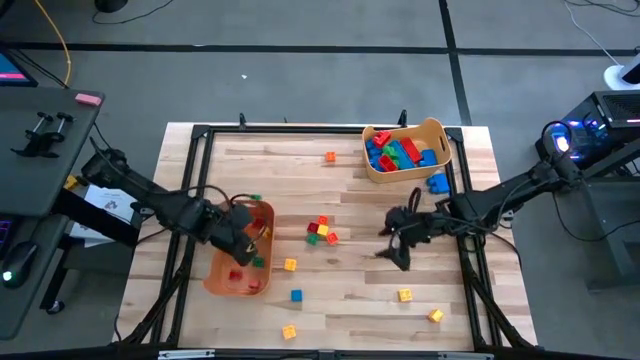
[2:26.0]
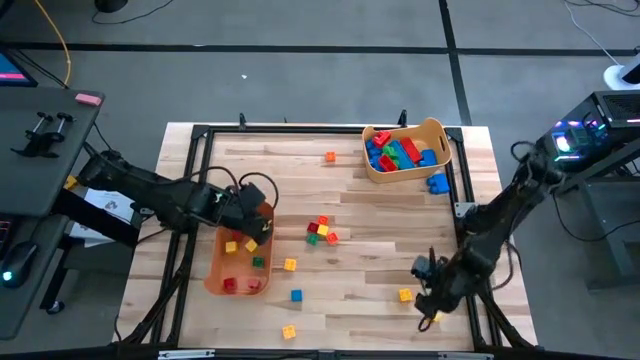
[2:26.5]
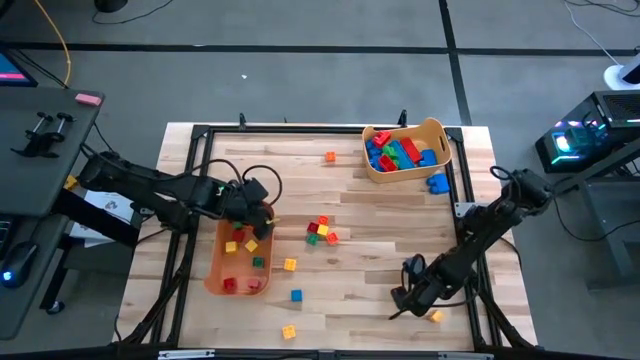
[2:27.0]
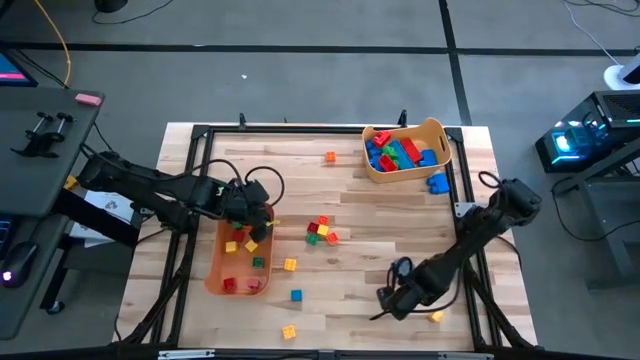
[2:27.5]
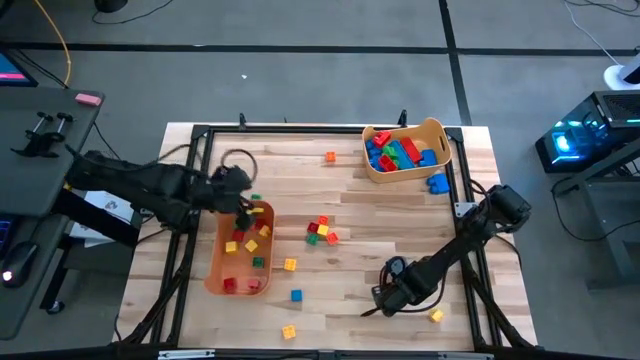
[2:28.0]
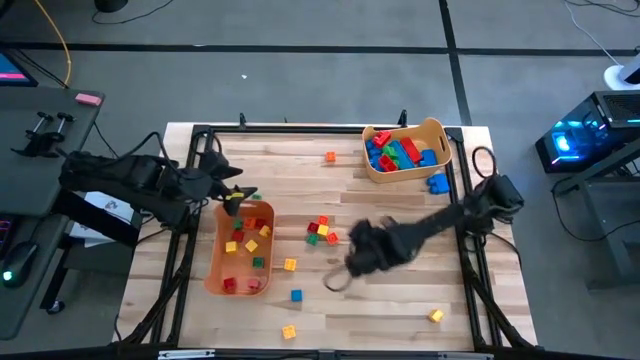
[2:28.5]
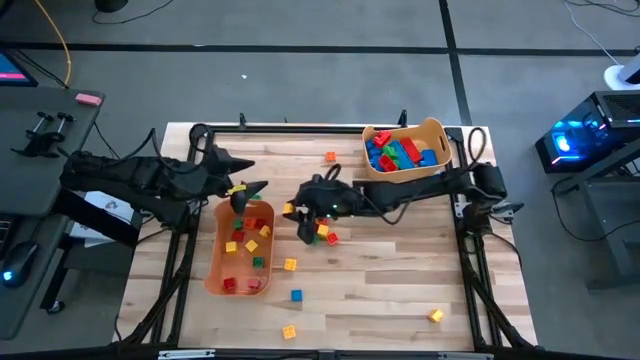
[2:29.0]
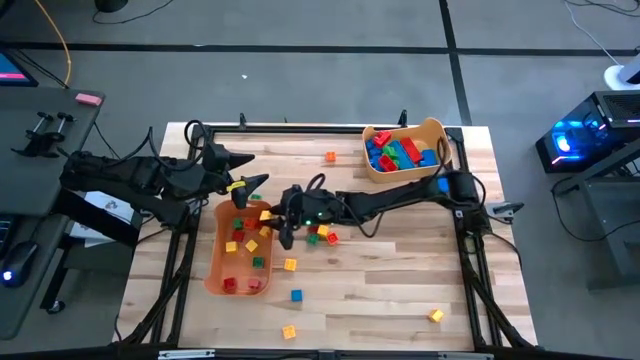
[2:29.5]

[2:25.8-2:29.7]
Task: Sort blocks by size
Put the yellow game piece into the orange bin

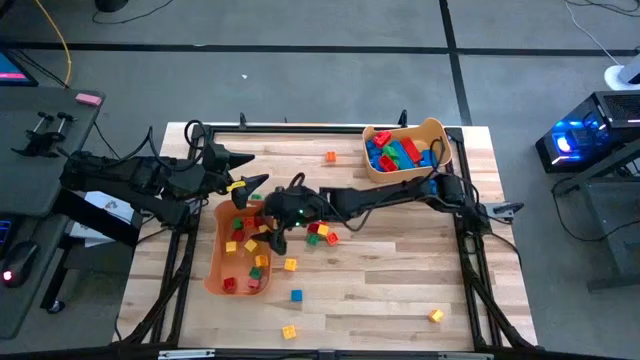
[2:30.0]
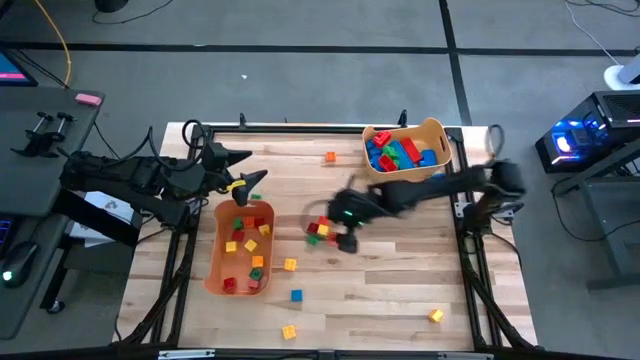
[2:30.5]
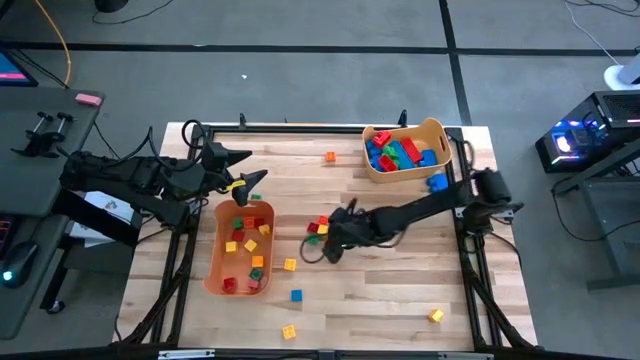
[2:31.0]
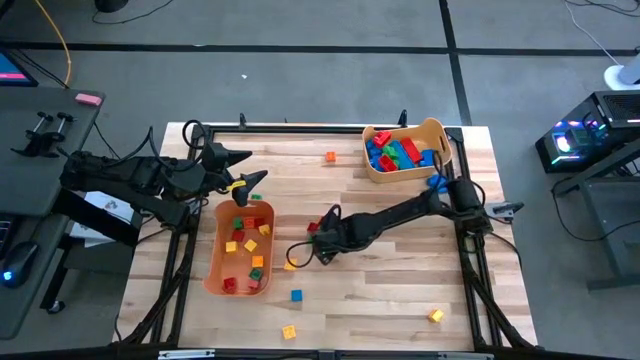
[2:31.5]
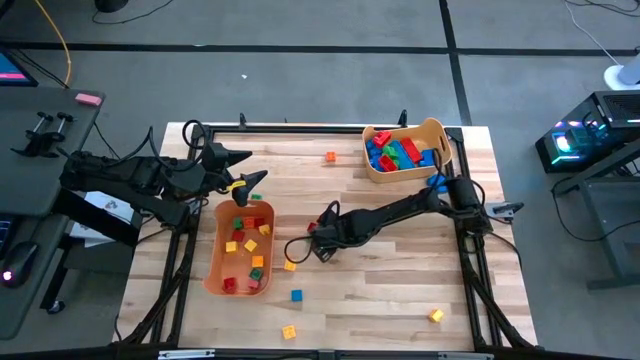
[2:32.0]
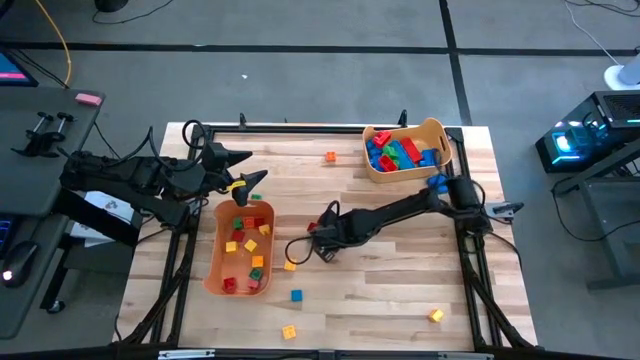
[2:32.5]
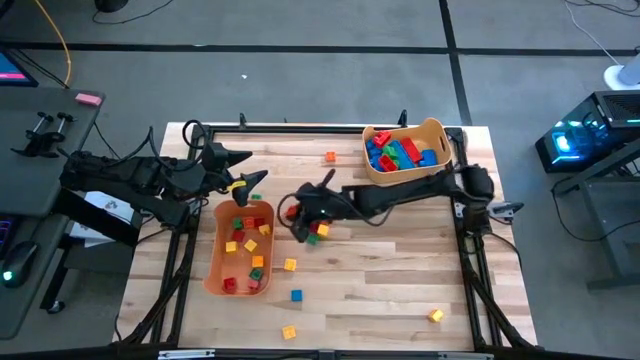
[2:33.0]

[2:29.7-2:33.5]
Put the orange game piece into the orange bin

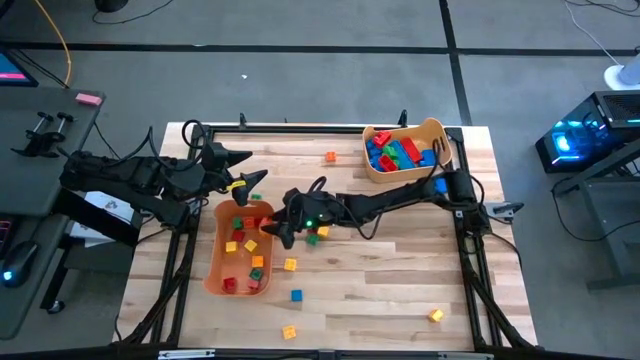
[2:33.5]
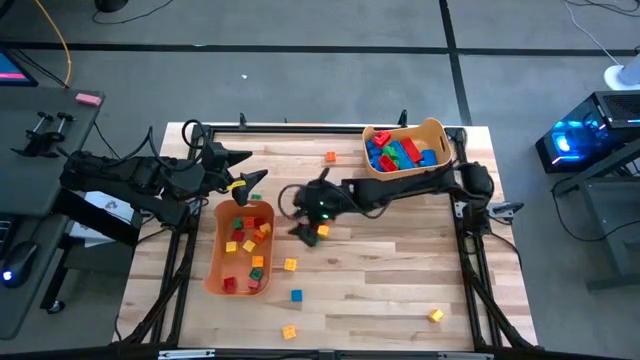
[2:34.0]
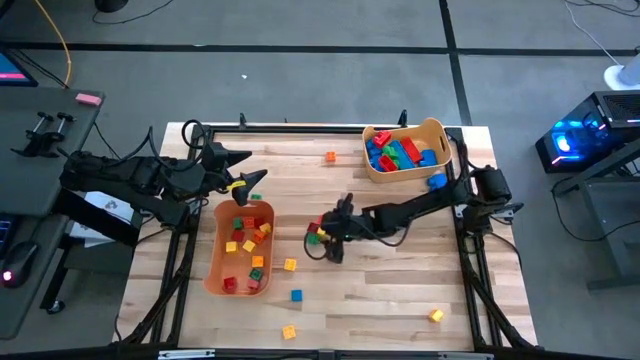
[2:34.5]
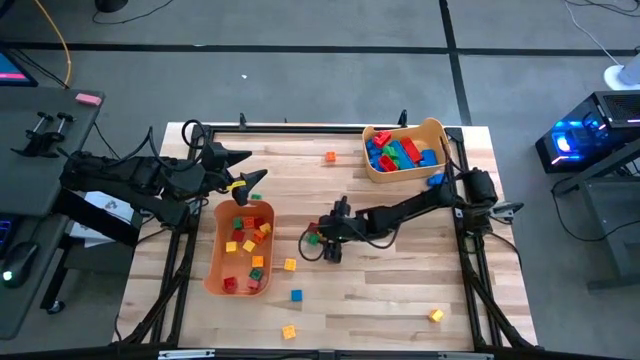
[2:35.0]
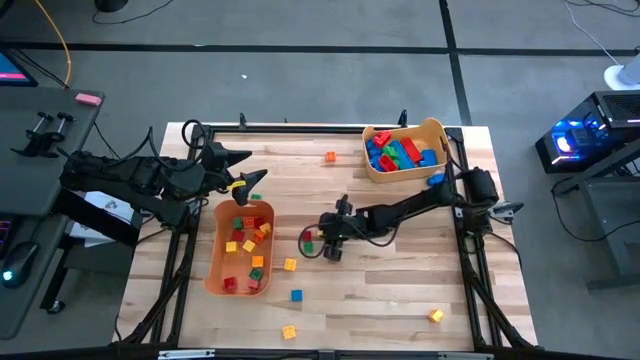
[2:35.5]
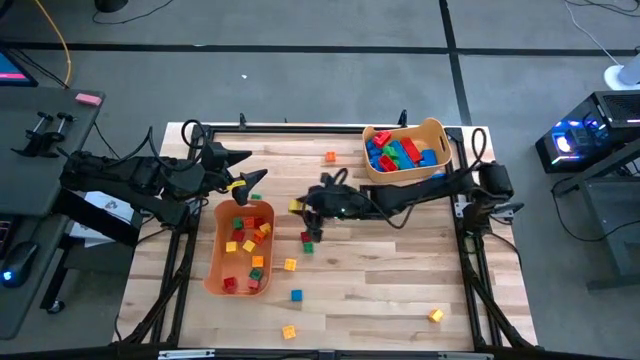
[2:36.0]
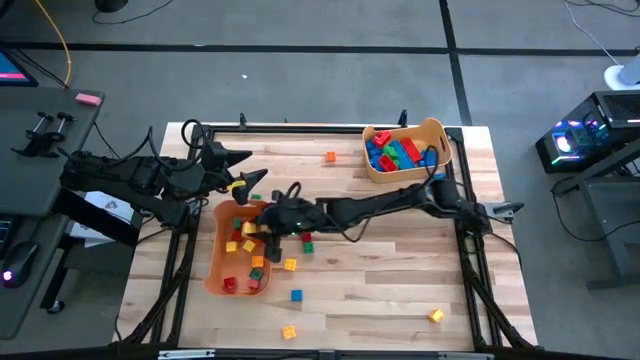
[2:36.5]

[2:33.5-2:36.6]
Put the yellow block into the orange bin

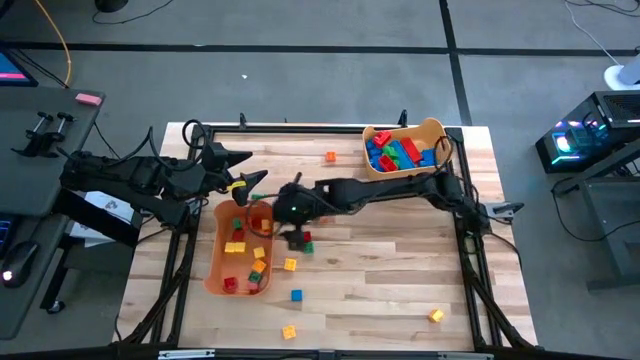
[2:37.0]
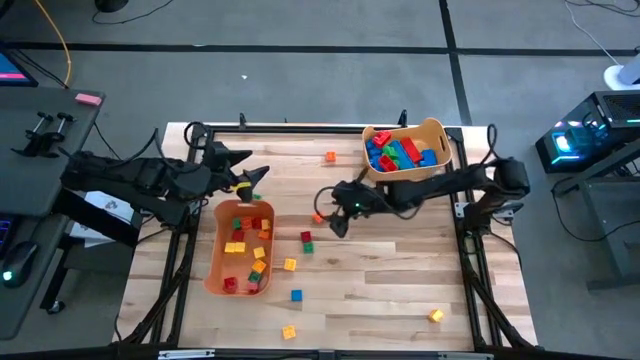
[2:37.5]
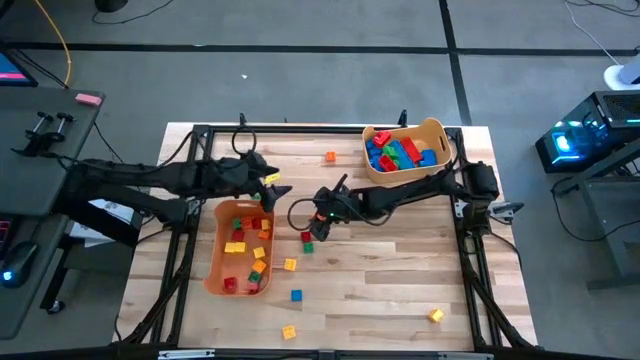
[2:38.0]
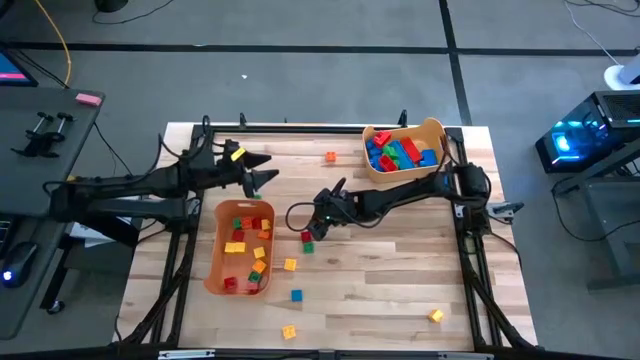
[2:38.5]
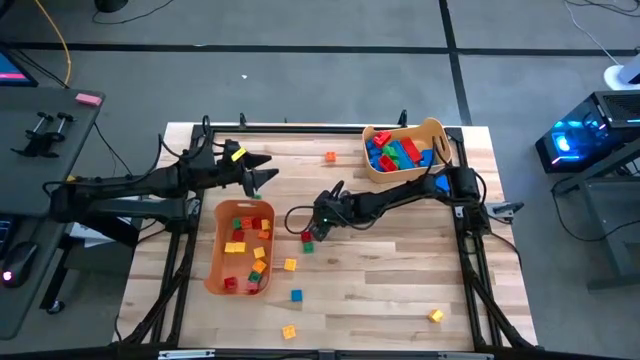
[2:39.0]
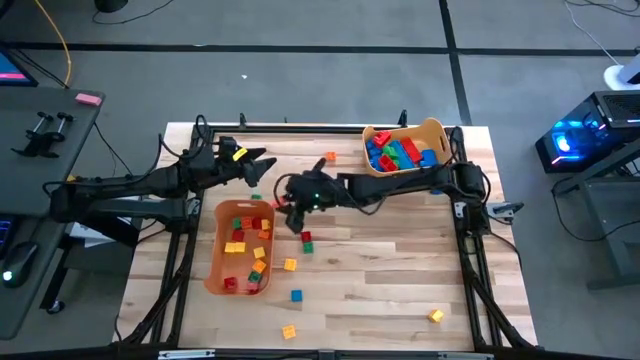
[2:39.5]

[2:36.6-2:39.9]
Put the orange game piece into the orange bin

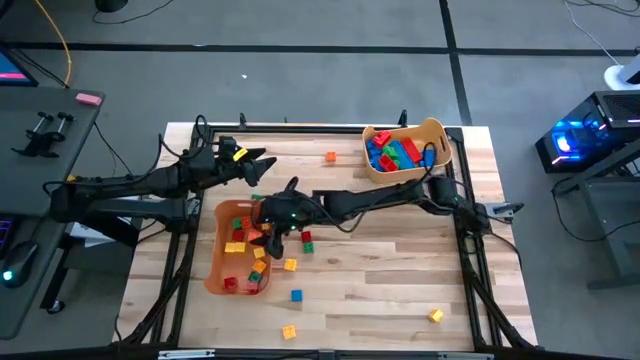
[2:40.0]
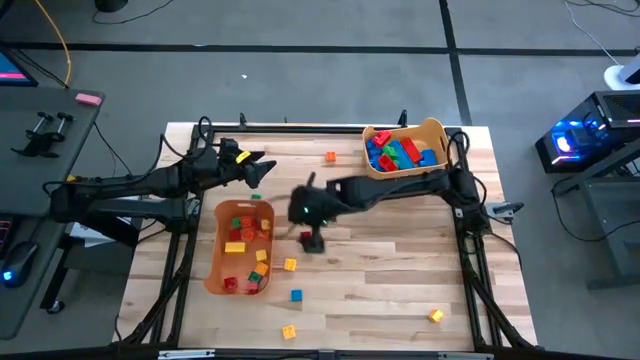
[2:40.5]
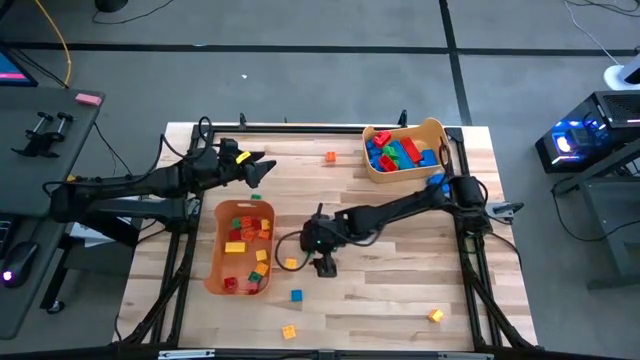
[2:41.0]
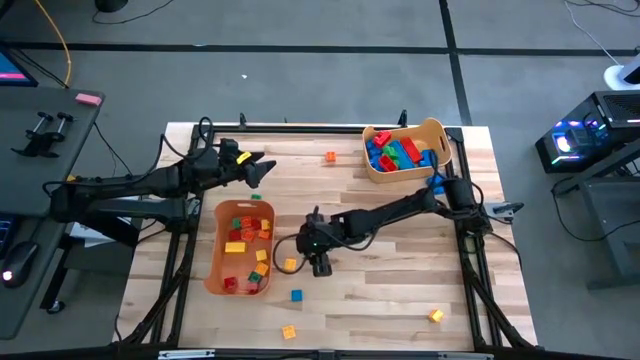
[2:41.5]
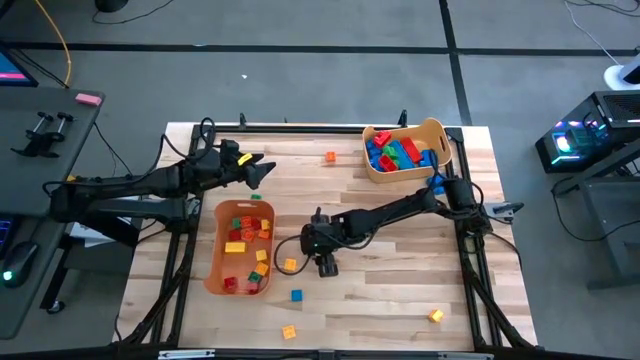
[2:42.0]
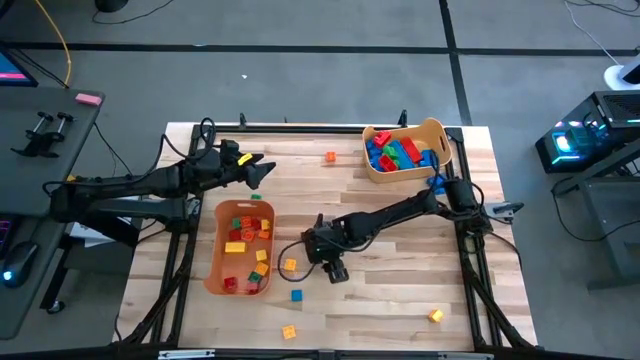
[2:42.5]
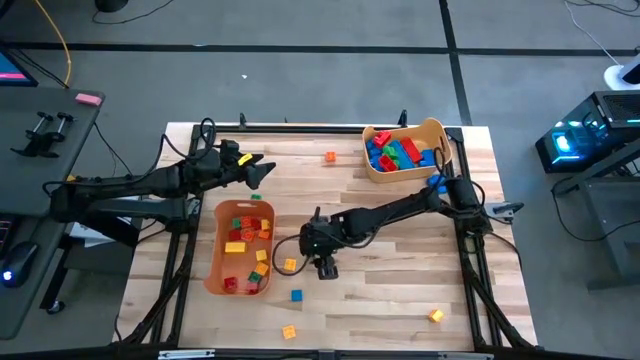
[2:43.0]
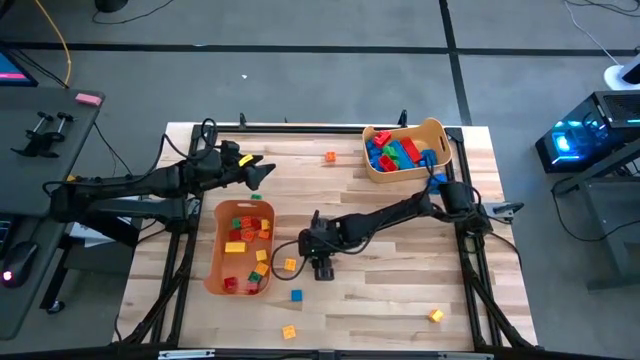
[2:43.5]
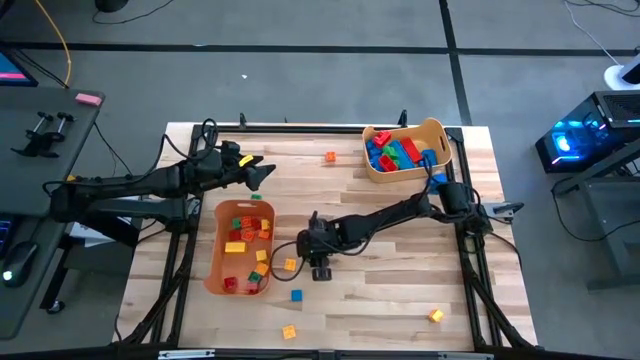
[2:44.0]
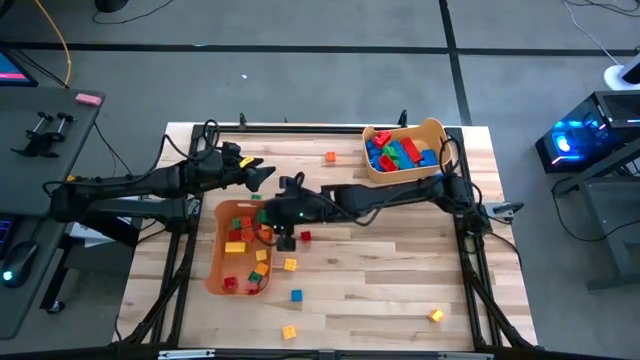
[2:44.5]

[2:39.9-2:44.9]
Put the green game piece into the orange bin

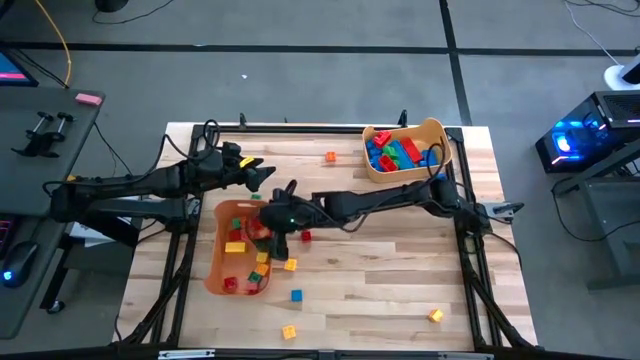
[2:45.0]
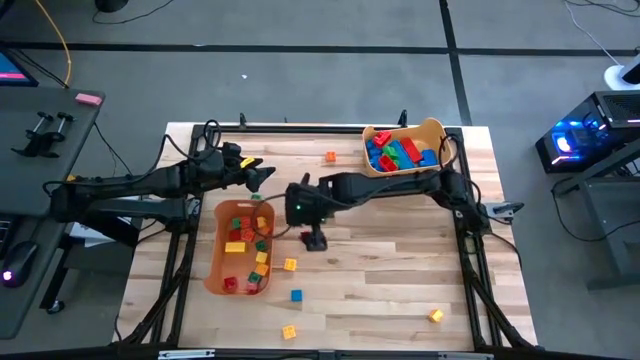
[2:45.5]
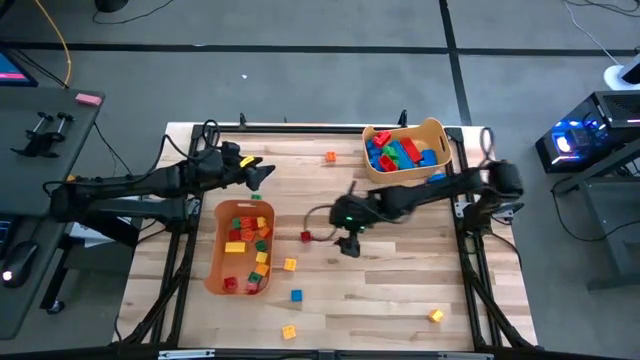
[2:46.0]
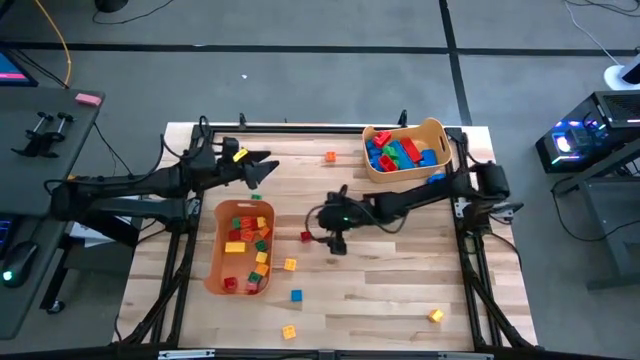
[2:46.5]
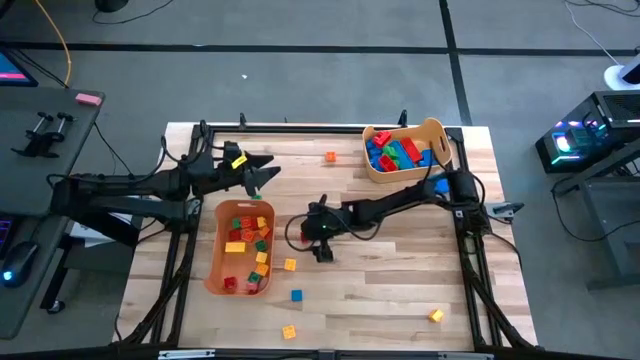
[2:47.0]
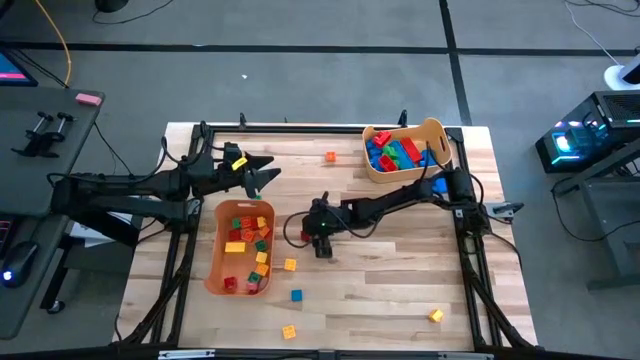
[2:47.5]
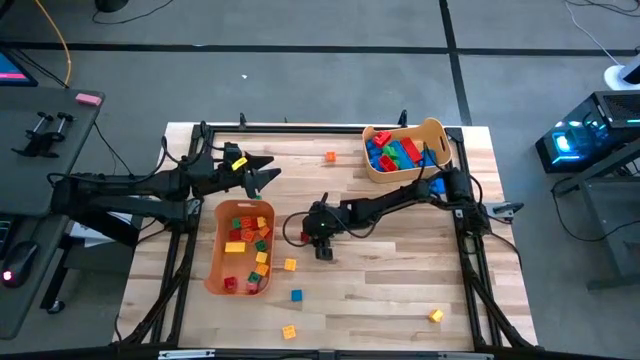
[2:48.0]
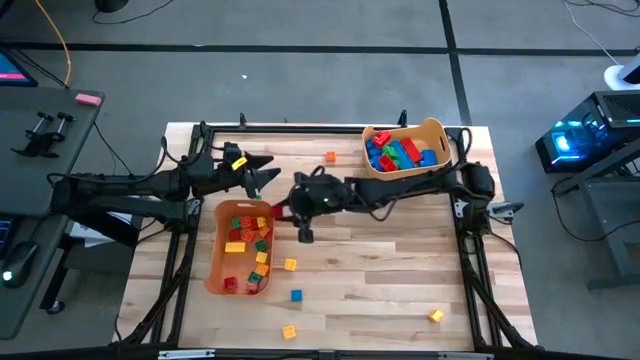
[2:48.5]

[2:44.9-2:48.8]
Put the red game piece into the orange bin
